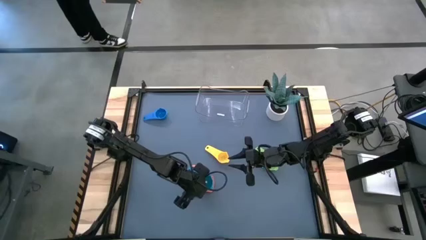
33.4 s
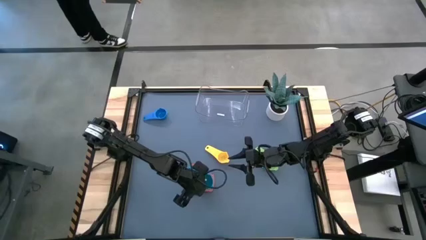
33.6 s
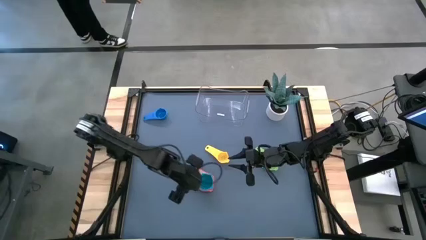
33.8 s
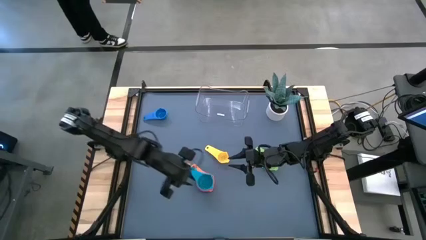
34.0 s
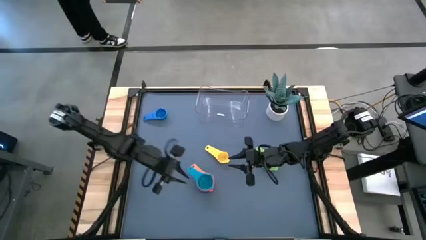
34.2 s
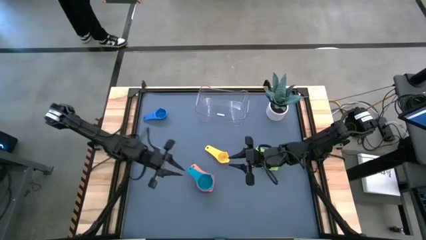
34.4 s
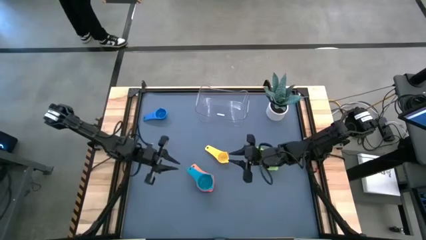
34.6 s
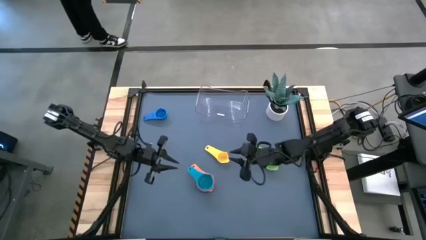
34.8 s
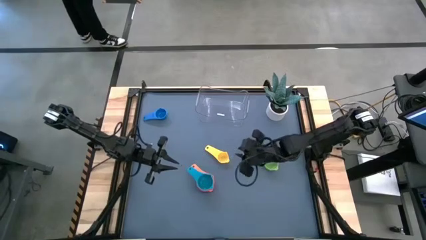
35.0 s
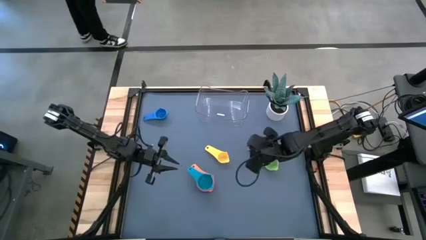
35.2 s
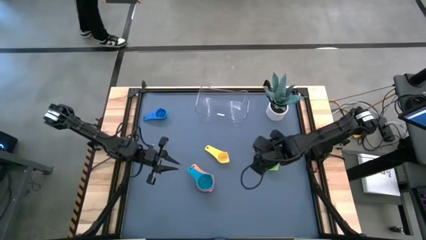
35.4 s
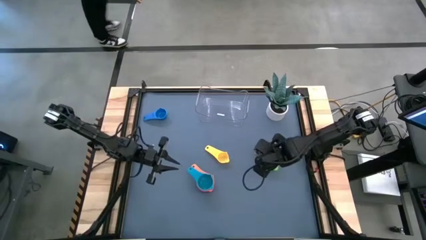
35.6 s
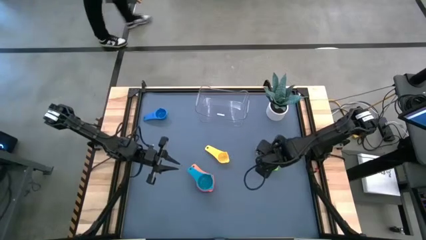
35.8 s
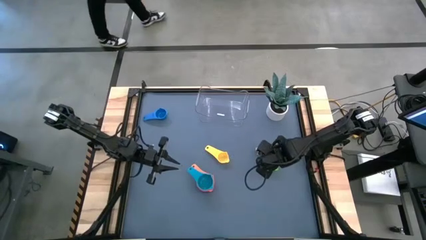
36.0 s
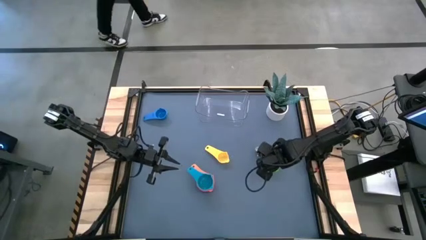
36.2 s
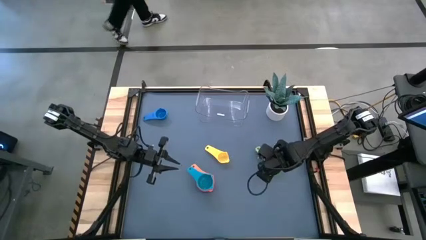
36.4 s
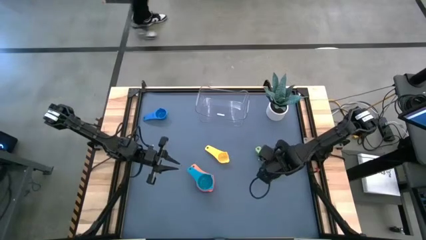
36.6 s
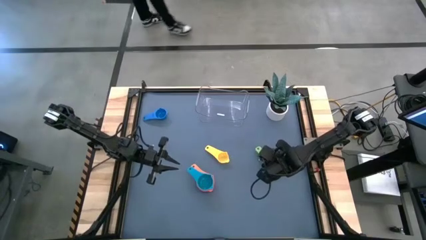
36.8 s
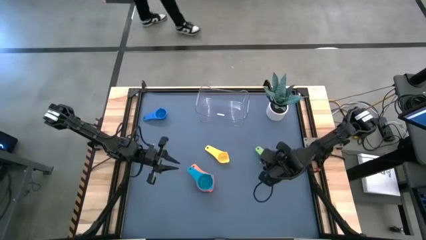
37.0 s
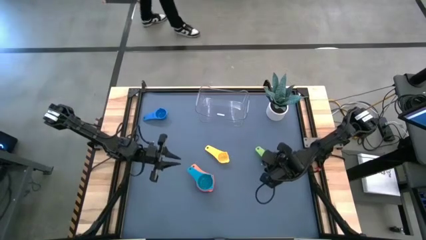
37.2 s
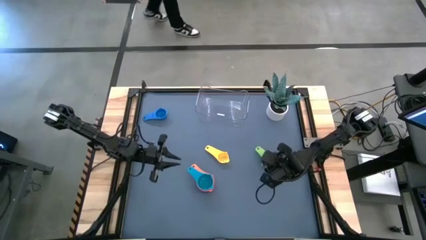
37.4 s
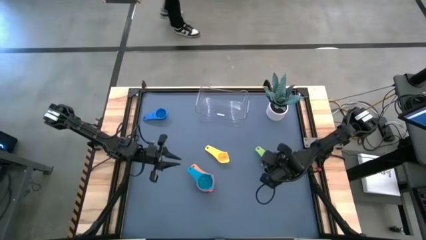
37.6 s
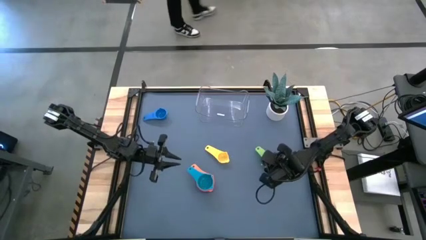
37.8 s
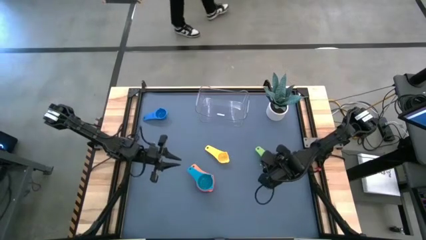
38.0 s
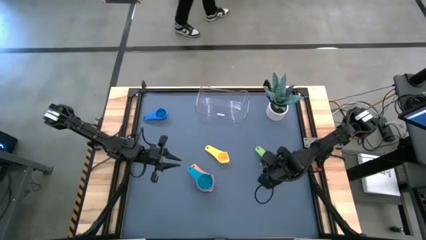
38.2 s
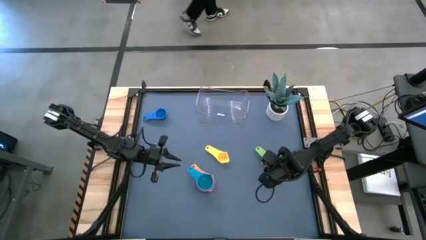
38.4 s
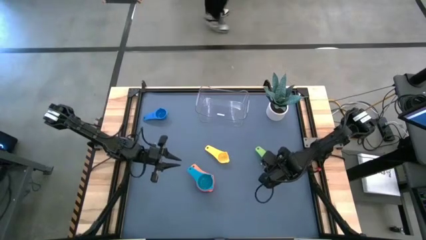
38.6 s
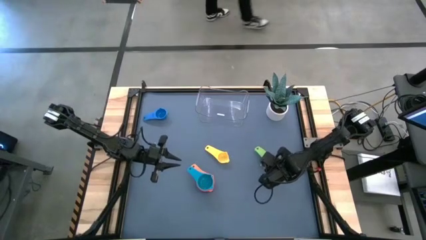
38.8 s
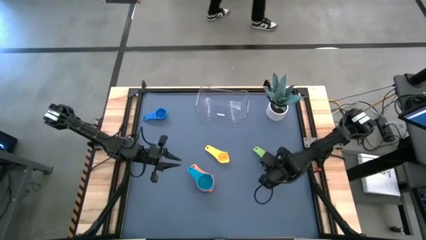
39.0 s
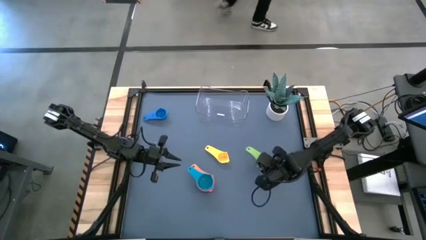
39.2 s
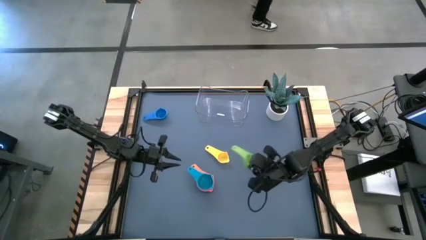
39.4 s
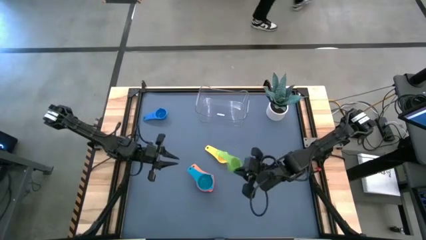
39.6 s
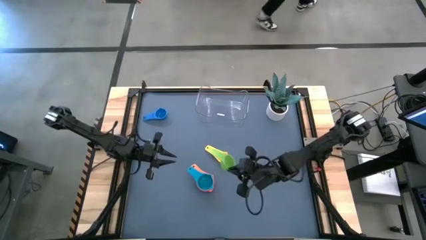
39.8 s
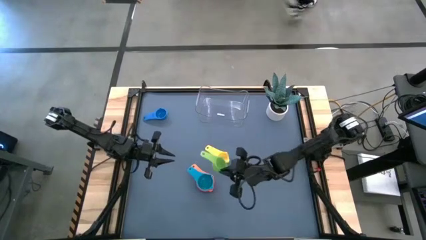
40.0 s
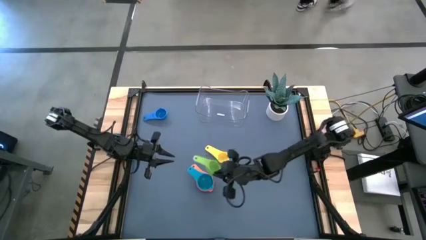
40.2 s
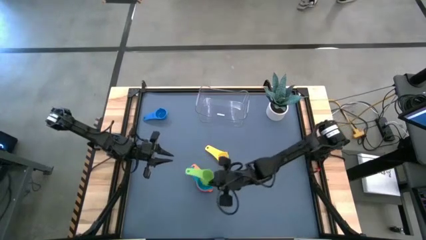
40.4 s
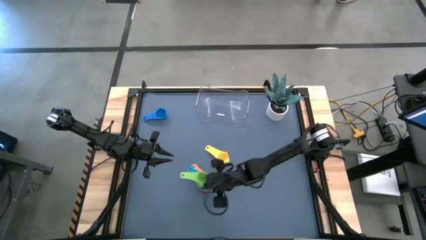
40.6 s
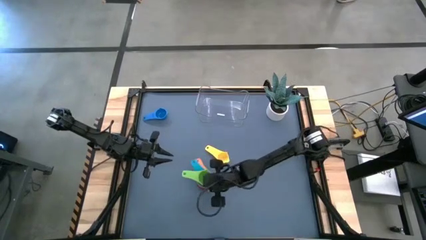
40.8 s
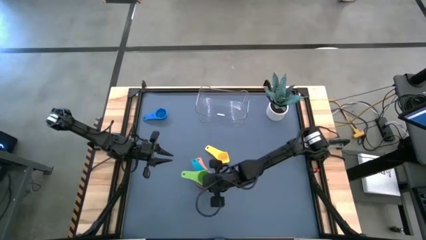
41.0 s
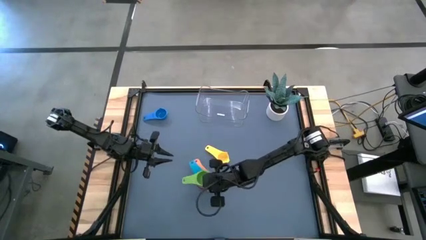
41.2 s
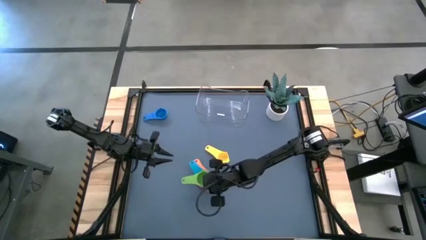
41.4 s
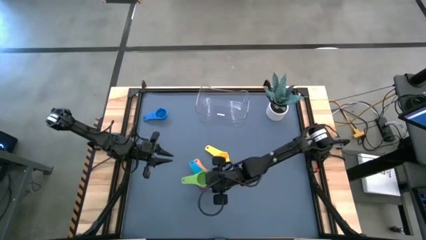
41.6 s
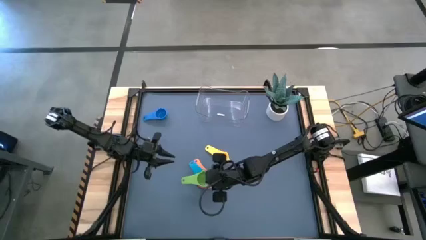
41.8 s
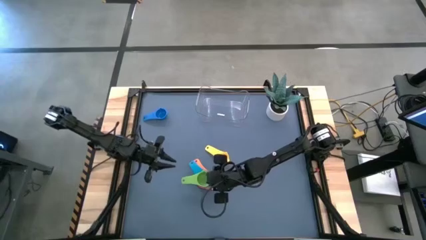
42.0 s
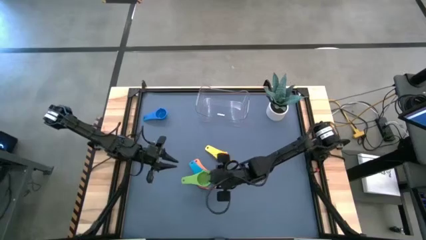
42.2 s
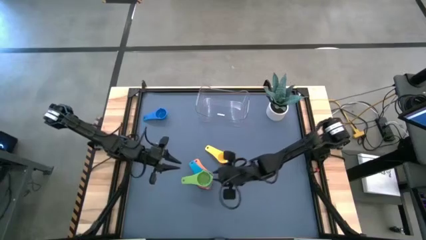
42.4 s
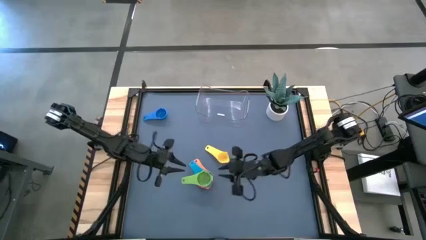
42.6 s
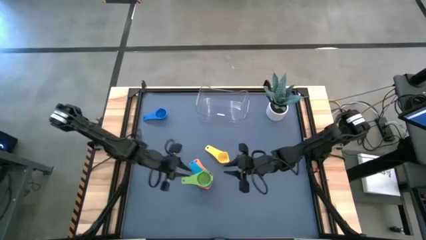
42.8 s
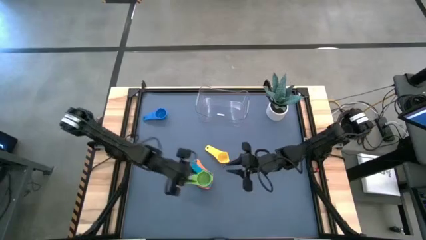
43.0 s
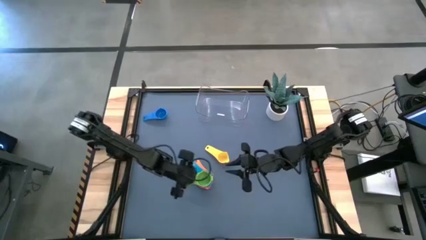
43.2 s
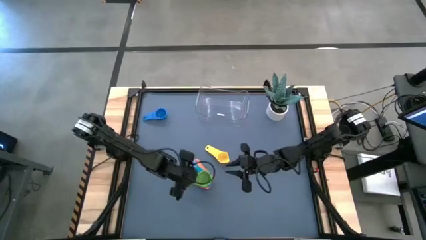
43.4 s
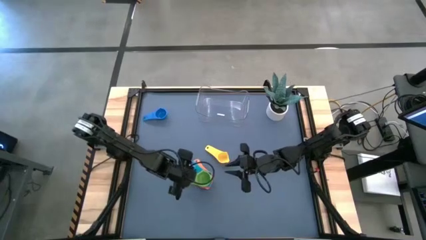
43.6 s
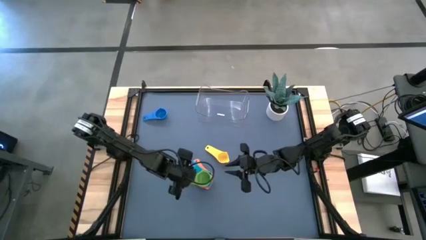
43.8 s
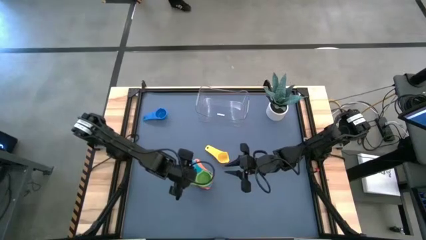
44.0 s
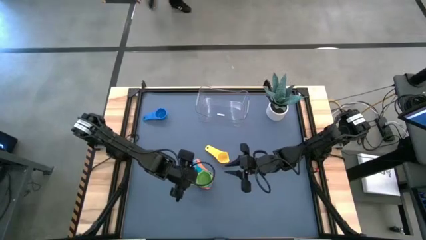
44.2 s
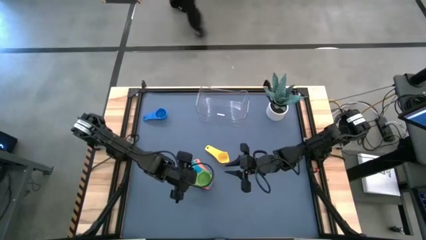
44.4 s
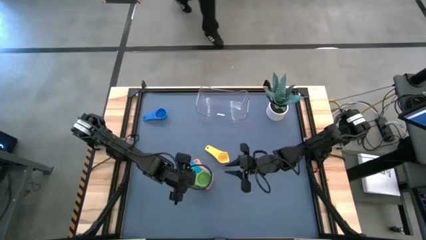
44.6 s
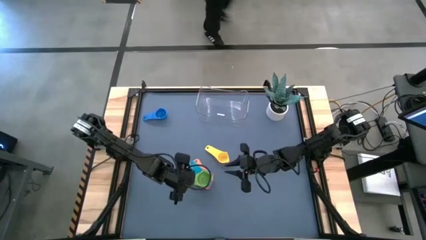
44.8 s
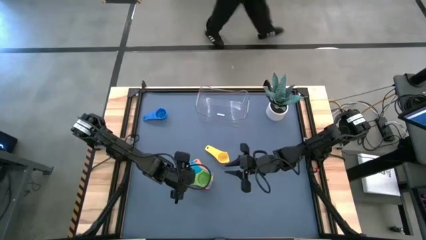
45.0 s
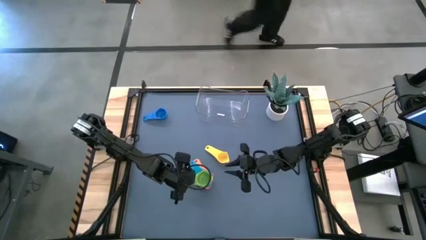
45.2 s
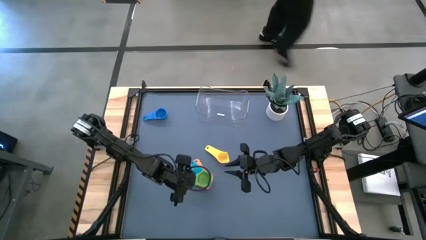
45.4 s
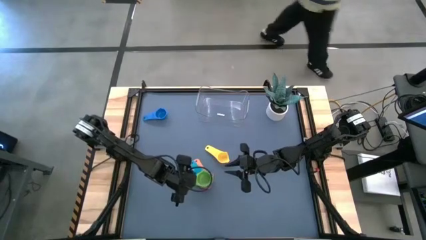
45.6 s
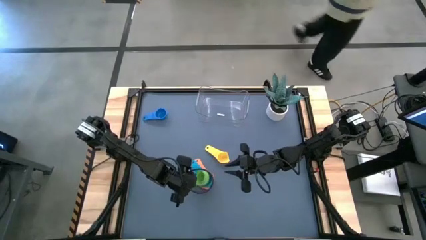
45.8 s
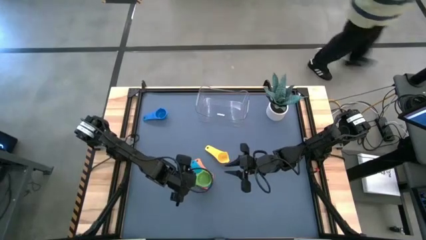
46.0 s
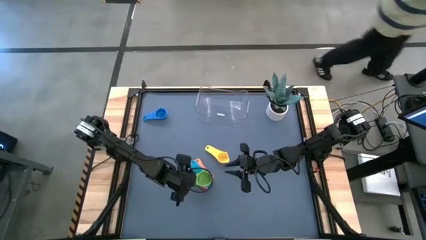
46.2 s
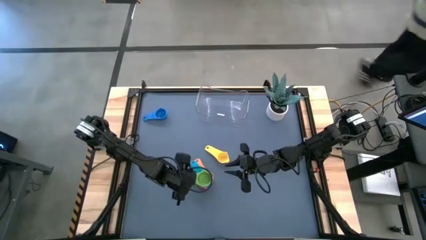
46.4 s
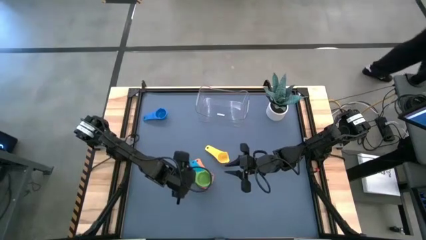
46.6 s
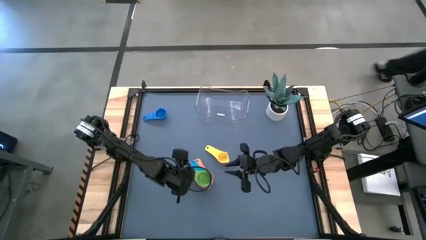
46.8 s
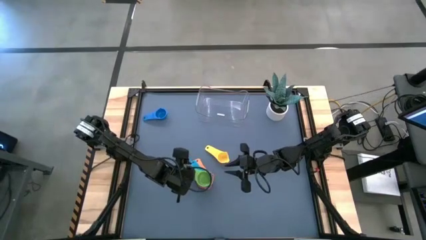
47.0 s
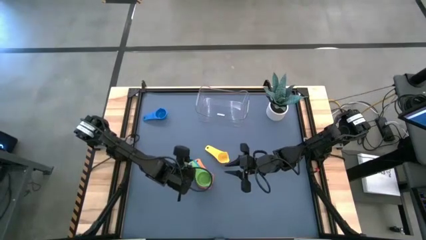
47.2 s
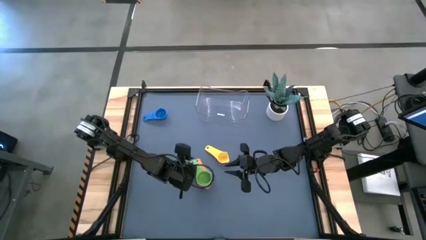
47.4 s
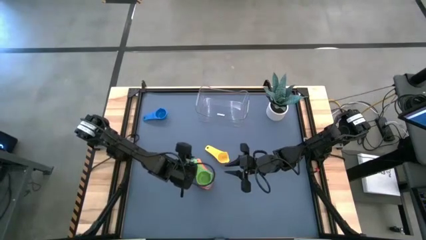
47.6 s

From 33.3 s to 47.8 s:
Task: Nest measuring cups in basket
Stack the green measuring cup on top of the light blue measuring cup
